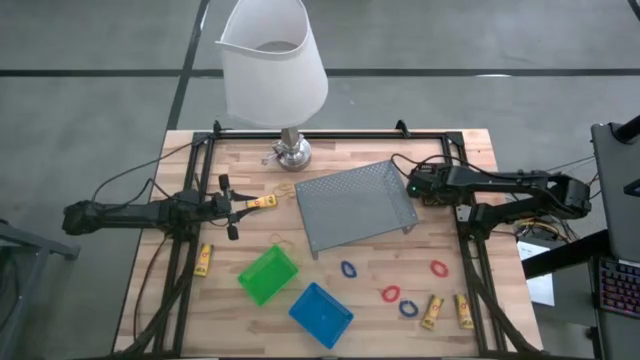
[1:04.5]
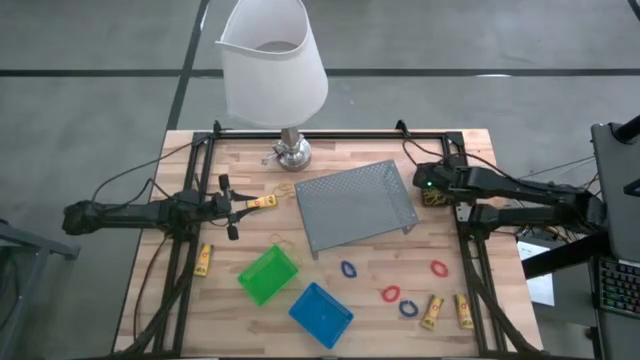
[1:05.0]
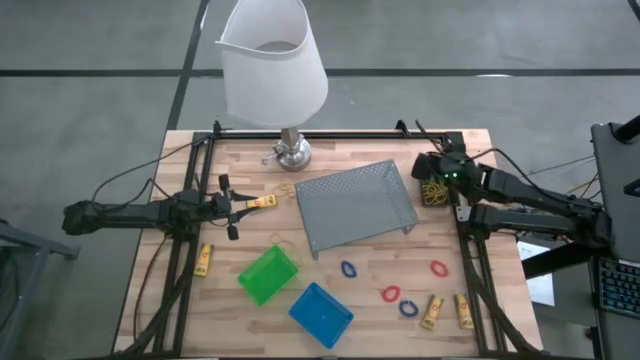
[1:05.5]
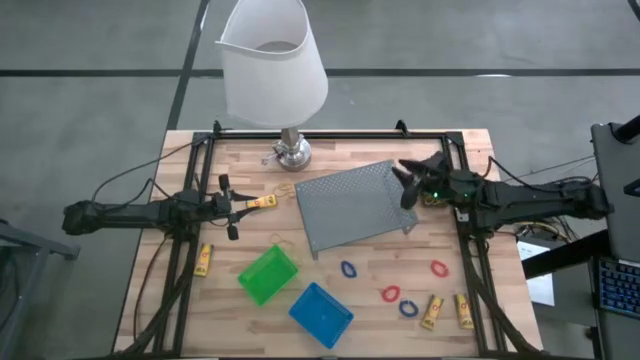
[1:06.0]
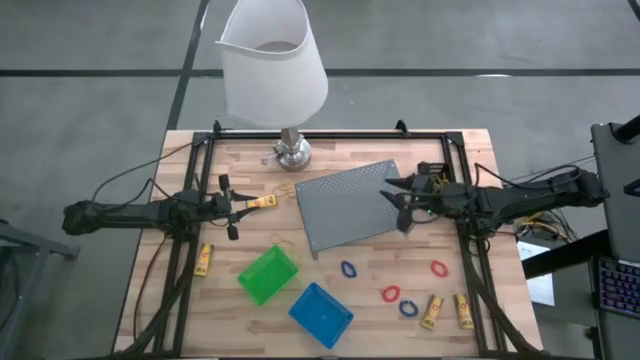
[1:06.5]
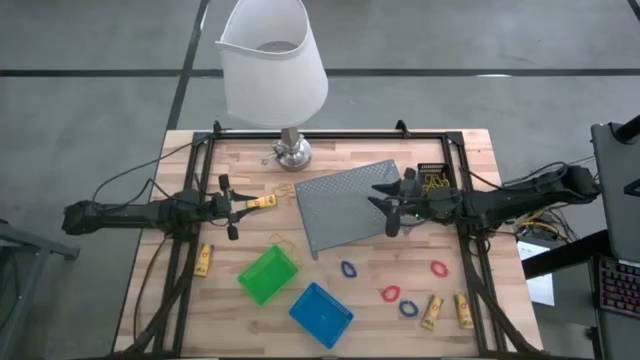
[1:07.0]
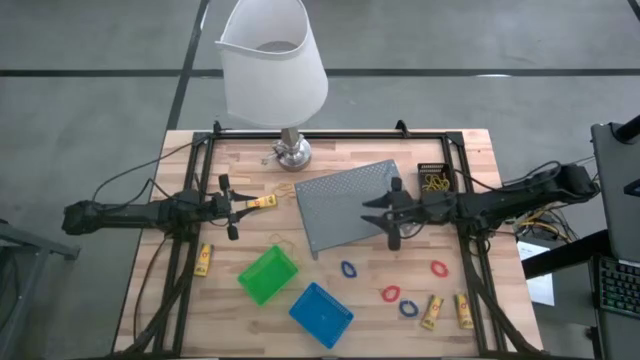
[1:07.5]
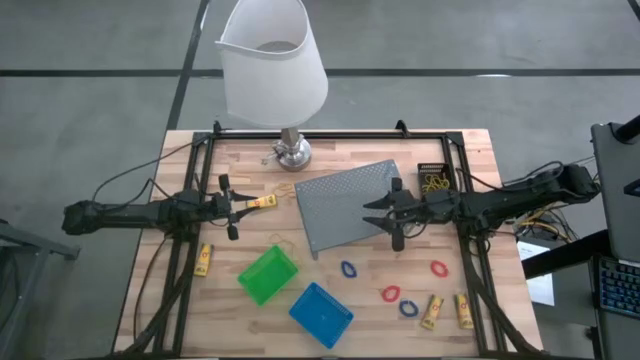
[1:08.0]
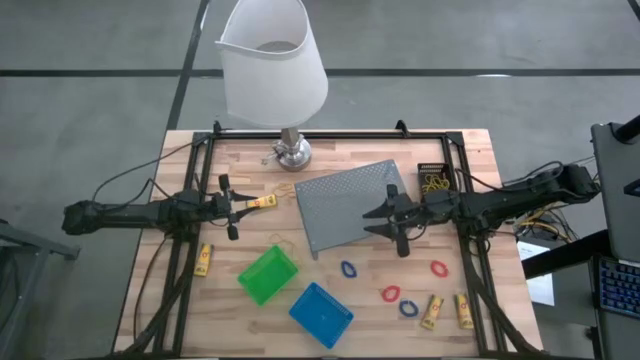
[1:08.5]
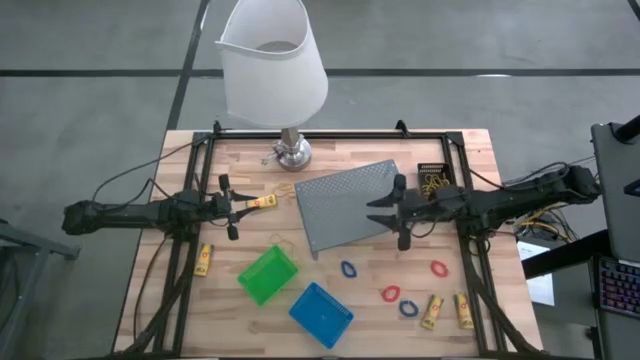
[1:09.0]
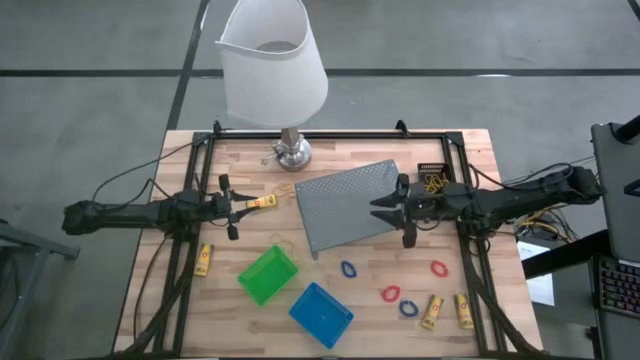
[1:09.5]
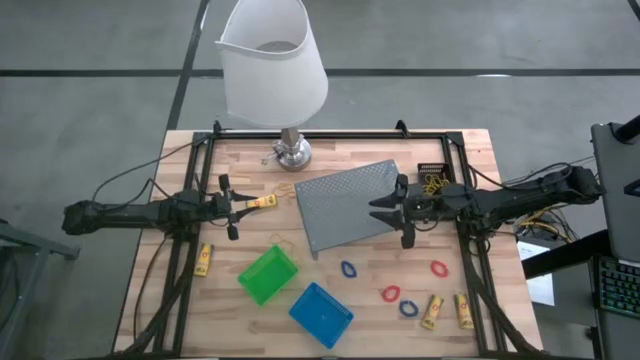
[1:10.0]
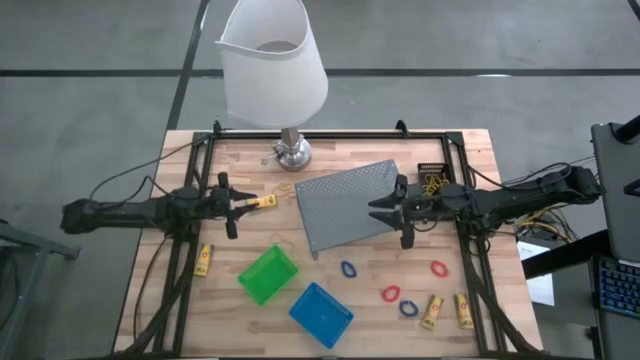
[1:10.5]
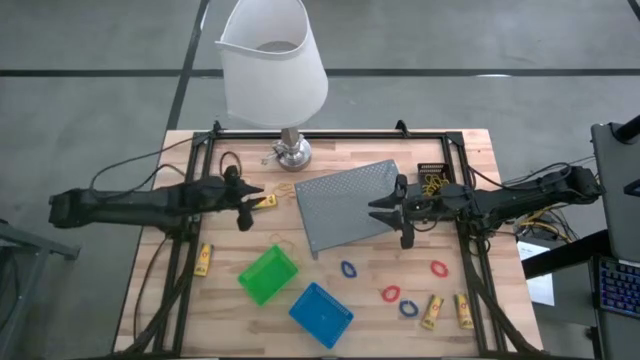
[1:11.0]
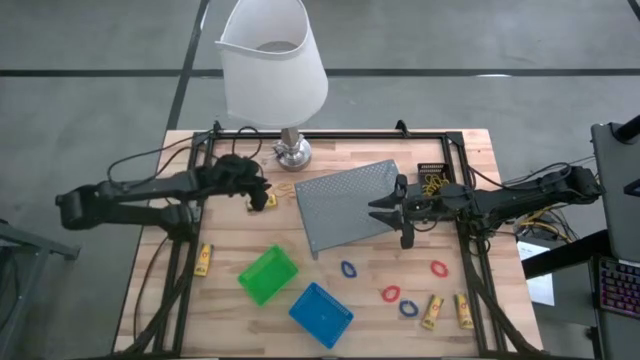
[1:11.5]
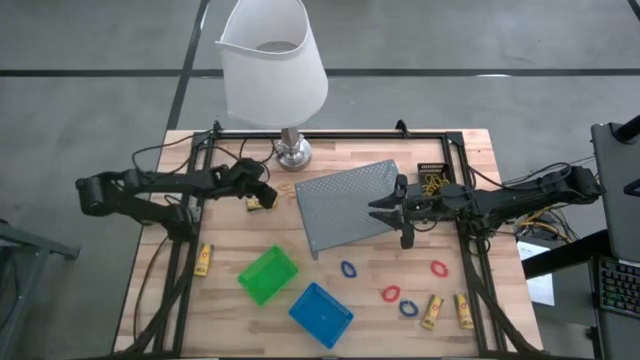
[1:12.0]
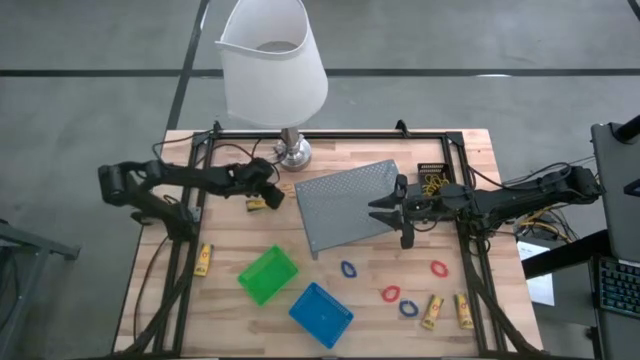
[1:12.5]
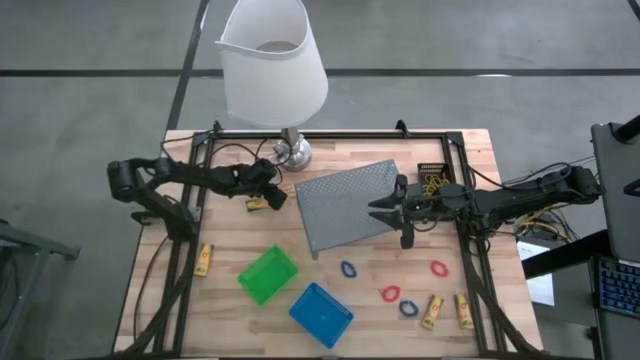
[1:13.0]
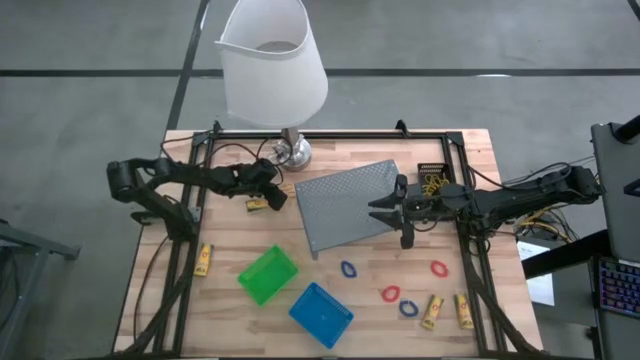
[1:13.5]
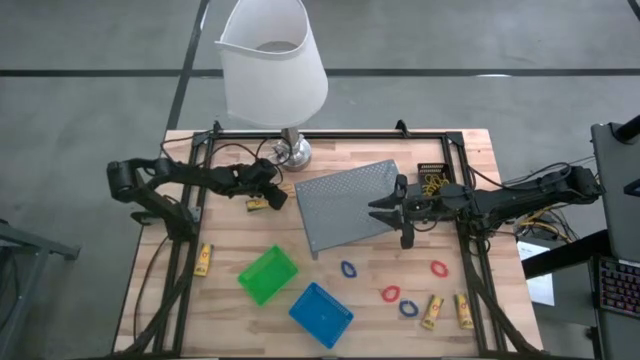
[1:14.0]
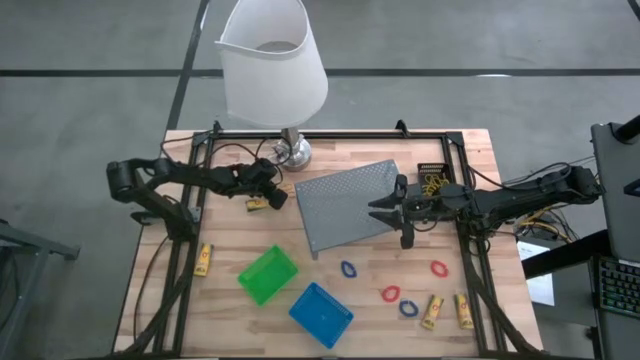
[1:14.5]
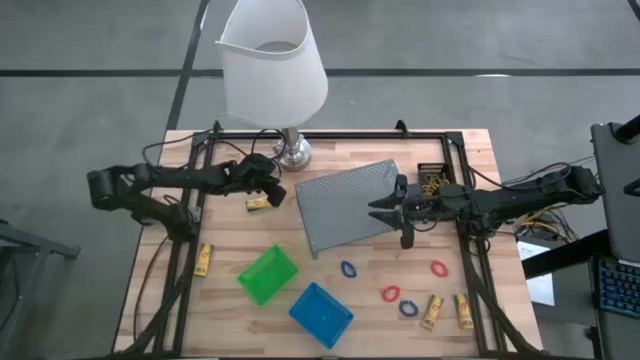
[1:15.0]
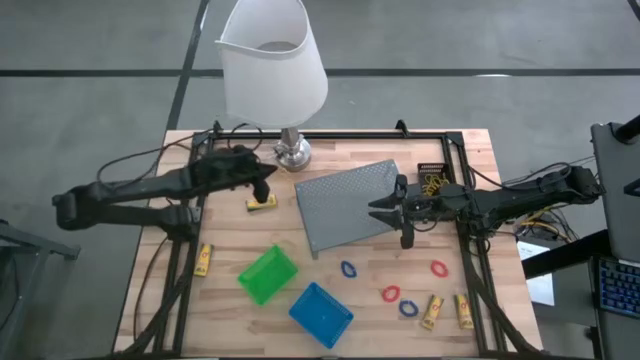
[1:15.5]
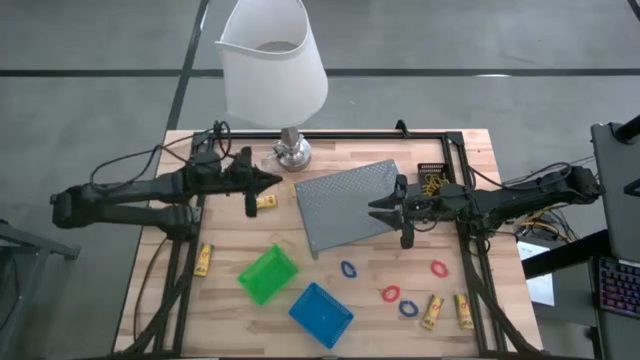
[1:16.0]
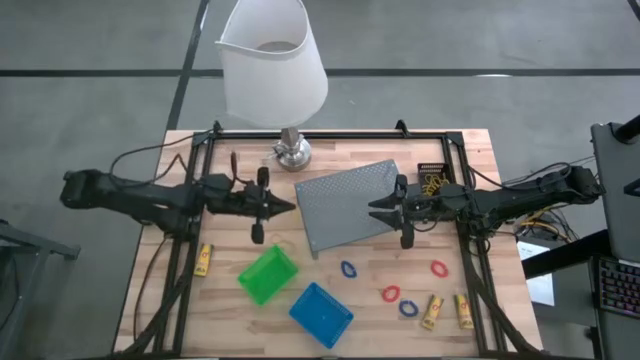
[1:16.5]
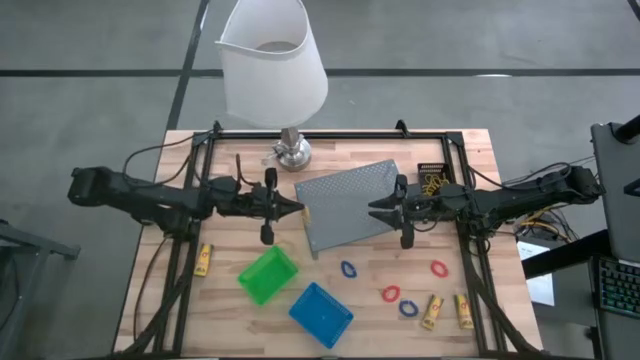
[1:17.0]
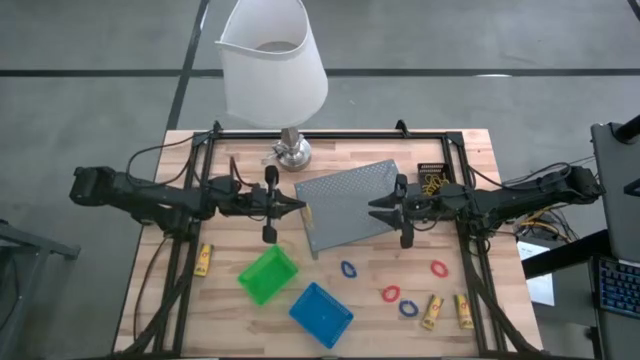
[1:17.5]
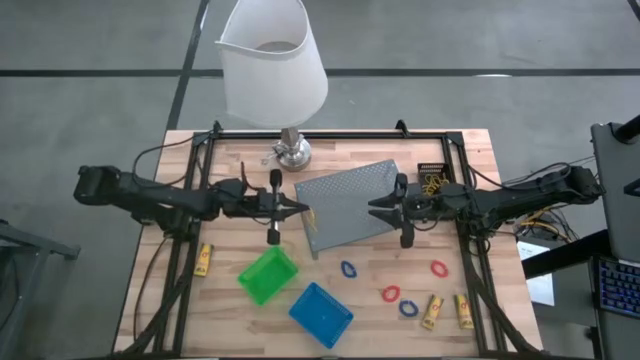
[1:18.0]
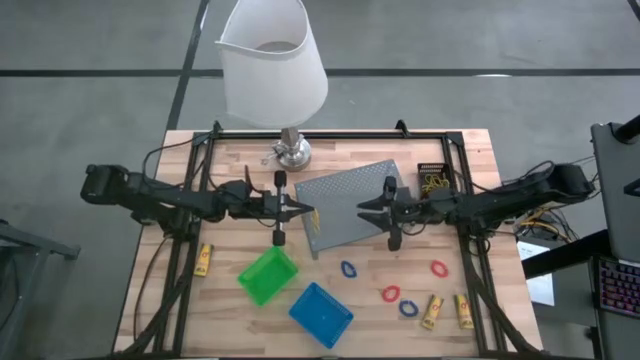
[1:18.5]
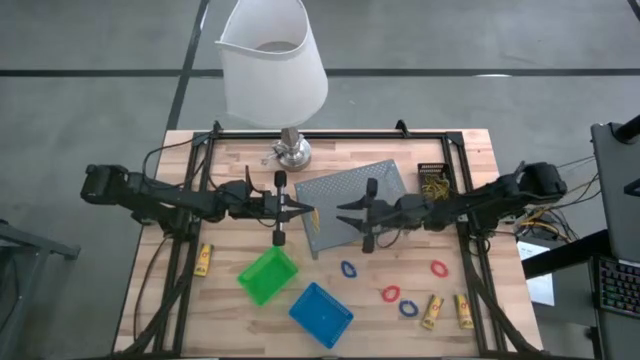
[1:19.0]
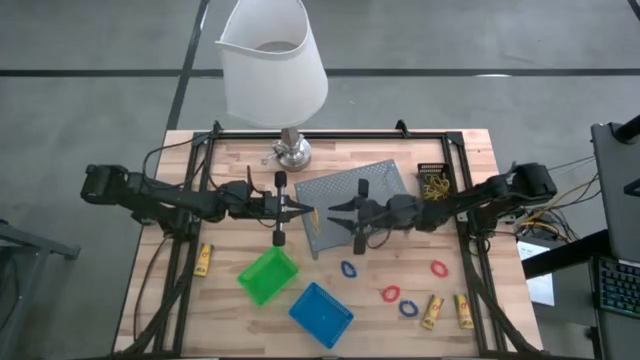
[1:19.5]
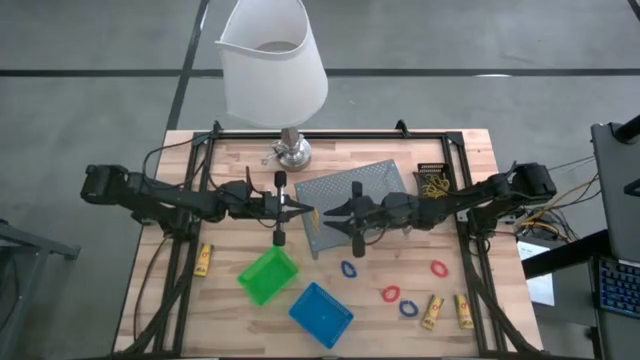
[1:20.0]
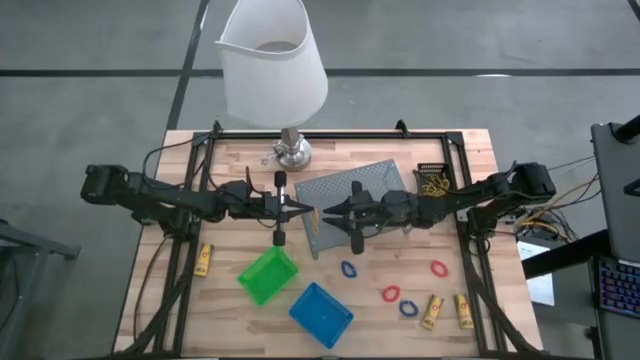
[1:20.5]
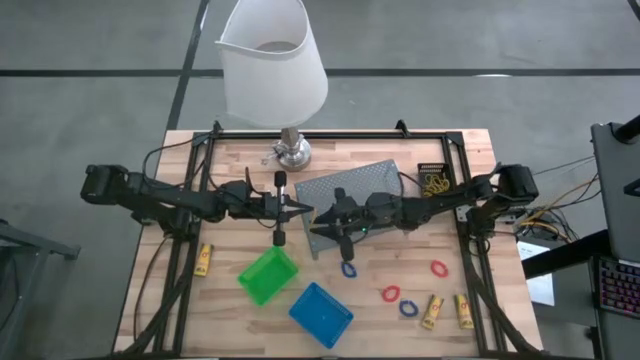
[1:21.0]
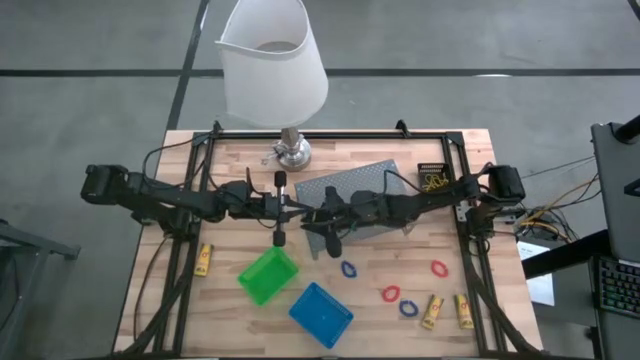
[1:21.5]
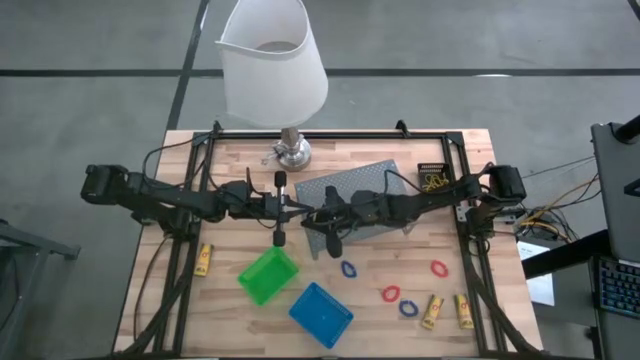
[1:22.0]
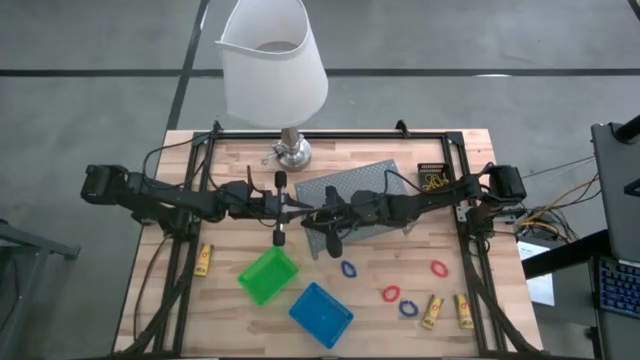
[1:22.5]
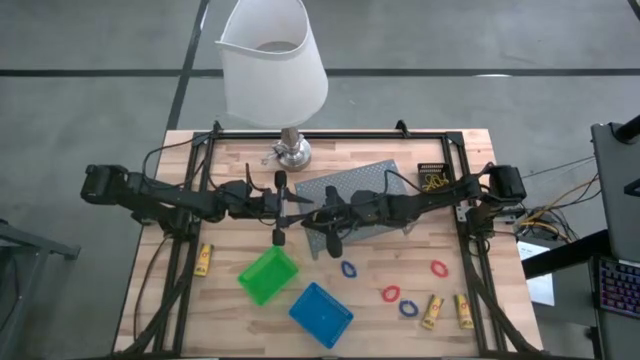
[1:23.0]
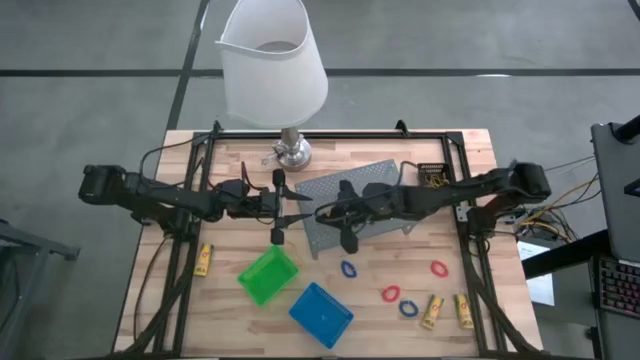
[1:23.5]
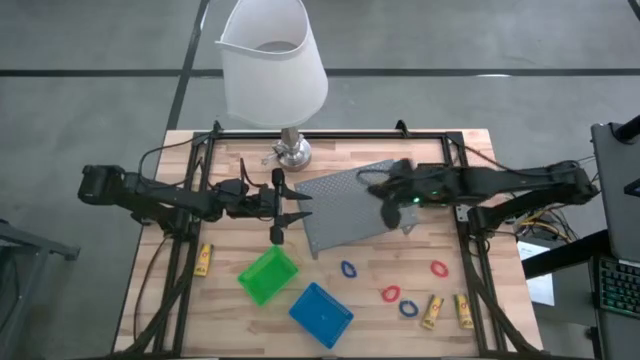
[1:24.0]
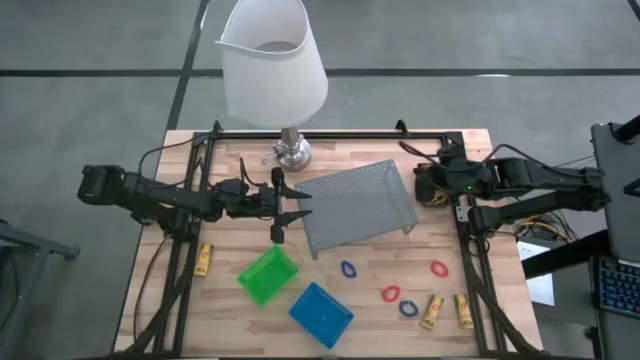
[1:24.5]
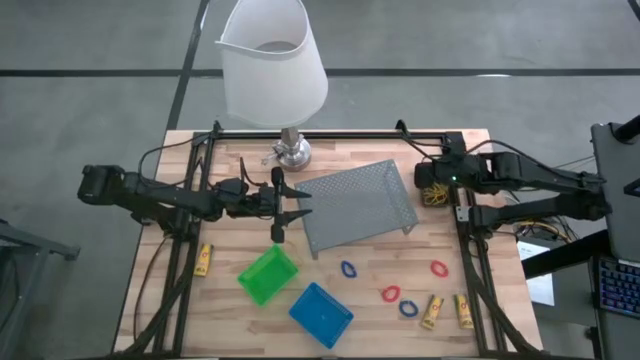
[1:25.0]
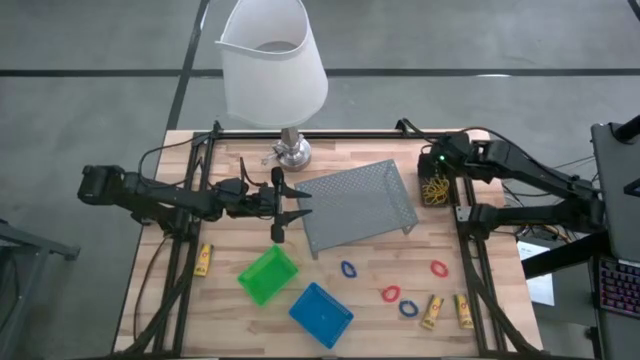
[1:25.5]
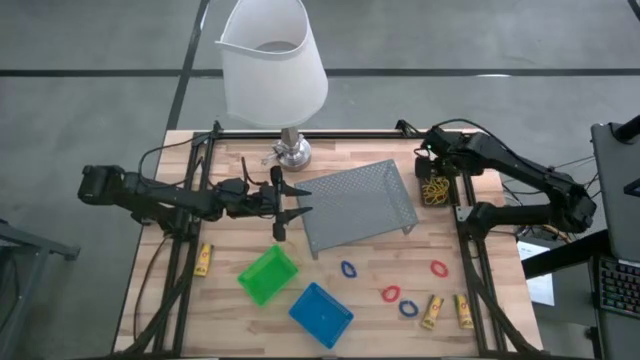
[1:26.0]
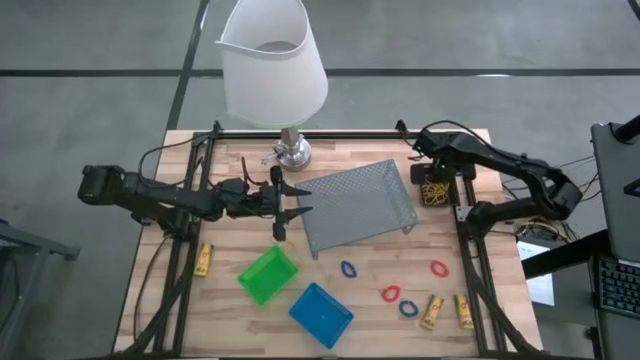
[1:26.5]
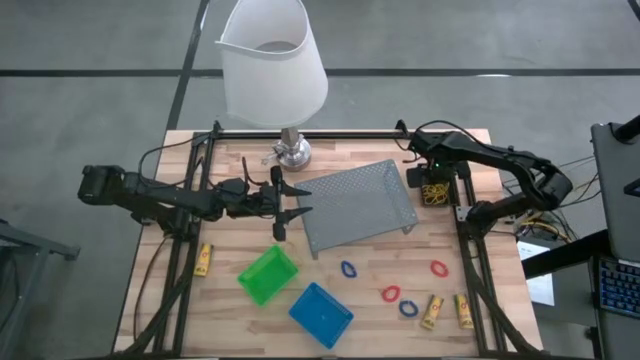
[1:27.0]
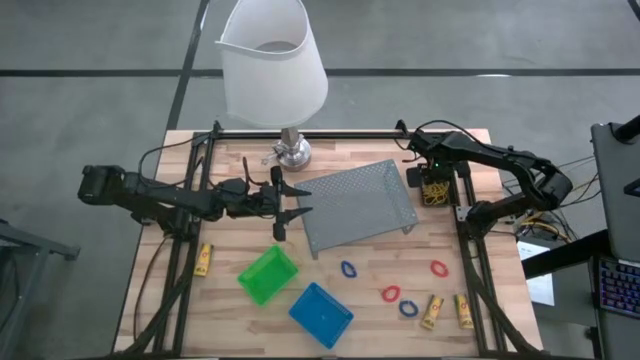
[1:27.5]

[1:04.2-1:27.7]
Task: Pick & Place Office Desk Supplies
Put the yellow rubber band into the black basket
